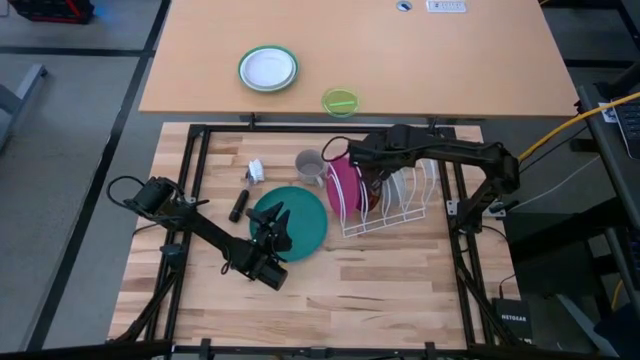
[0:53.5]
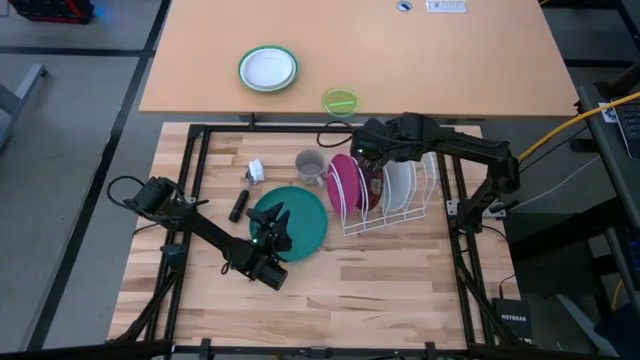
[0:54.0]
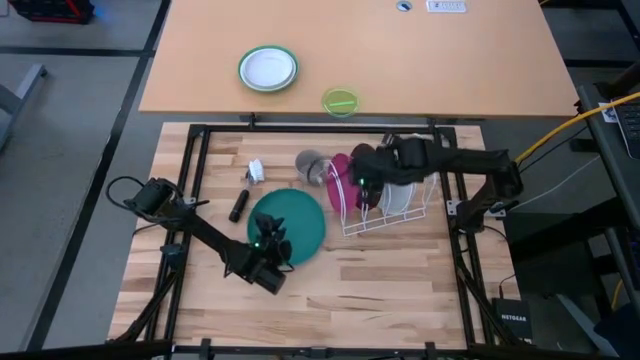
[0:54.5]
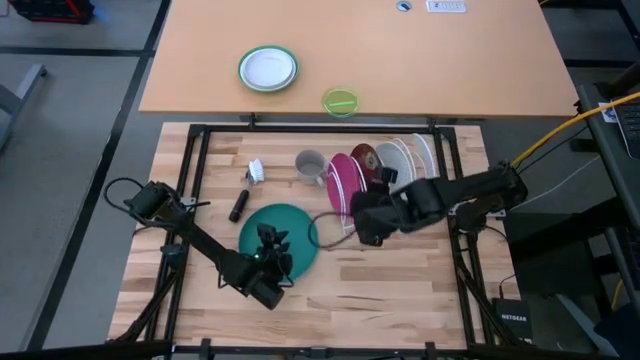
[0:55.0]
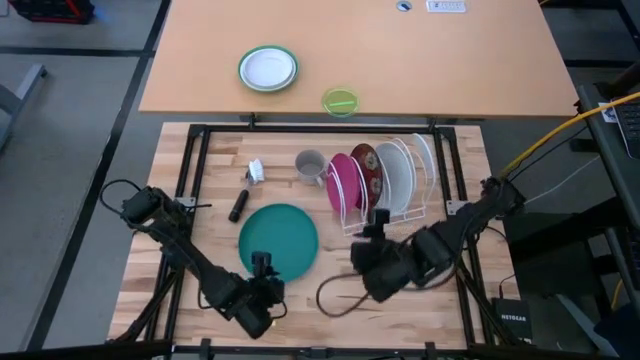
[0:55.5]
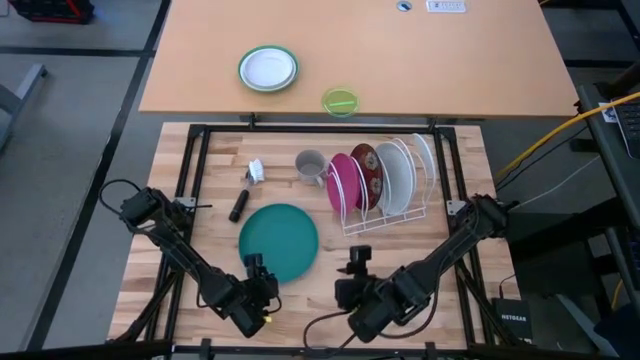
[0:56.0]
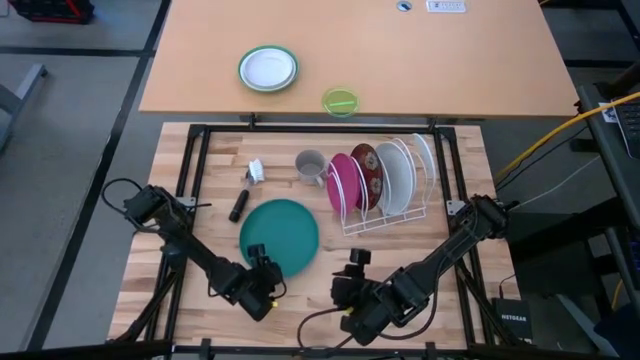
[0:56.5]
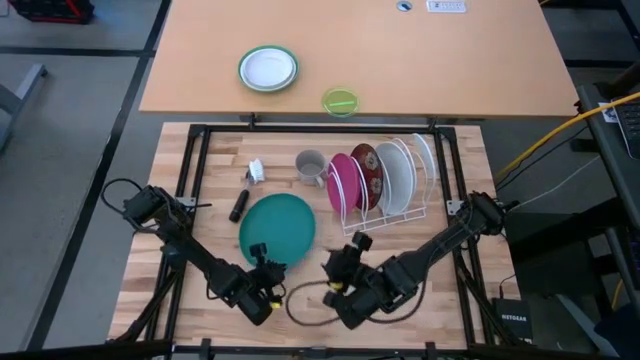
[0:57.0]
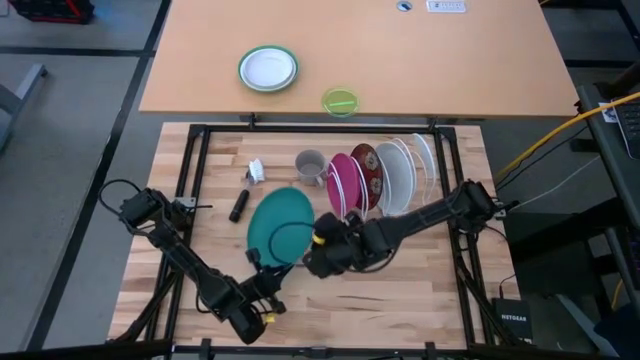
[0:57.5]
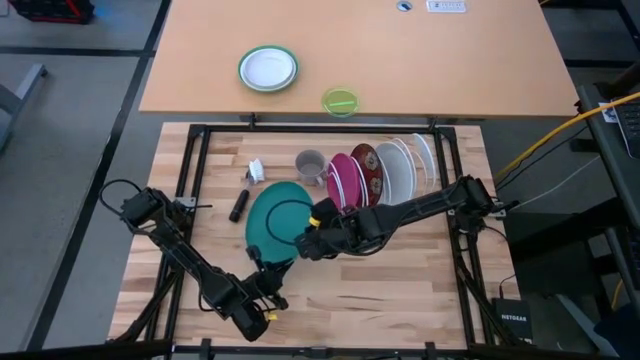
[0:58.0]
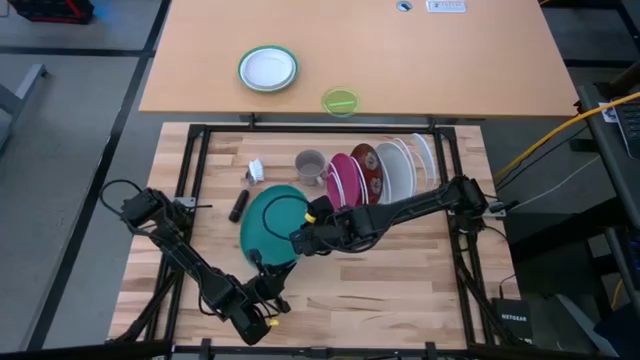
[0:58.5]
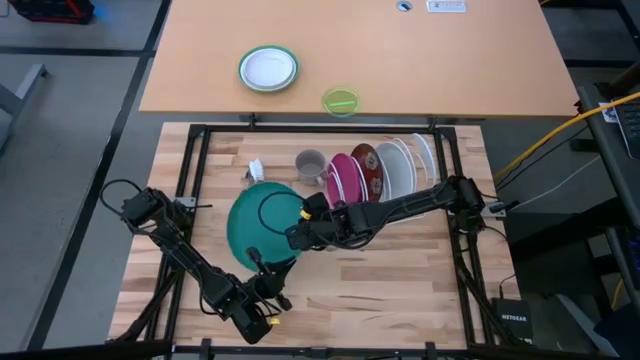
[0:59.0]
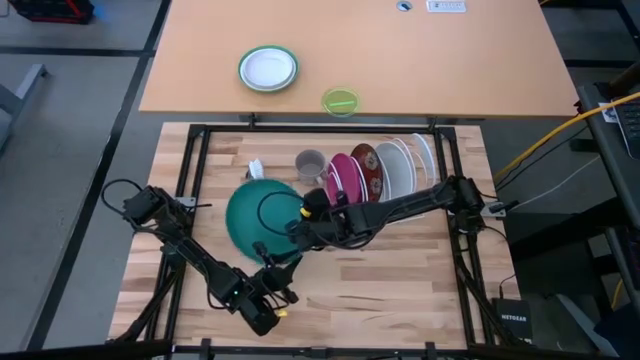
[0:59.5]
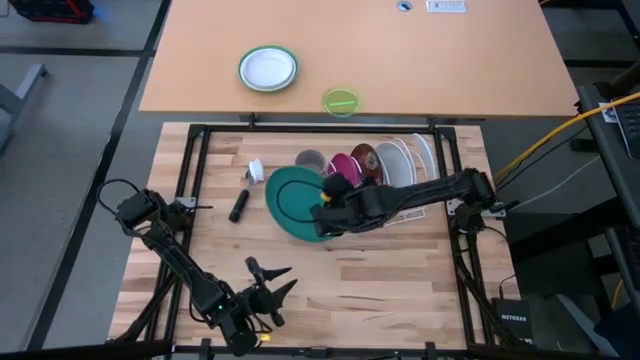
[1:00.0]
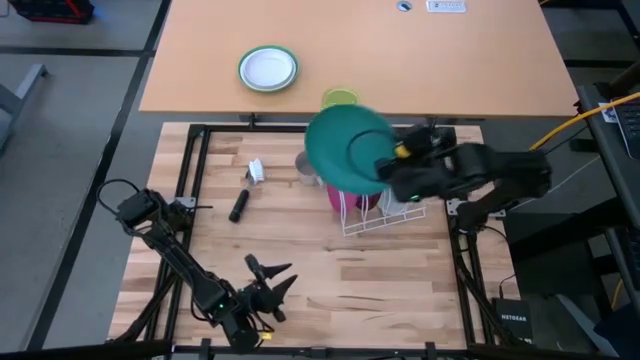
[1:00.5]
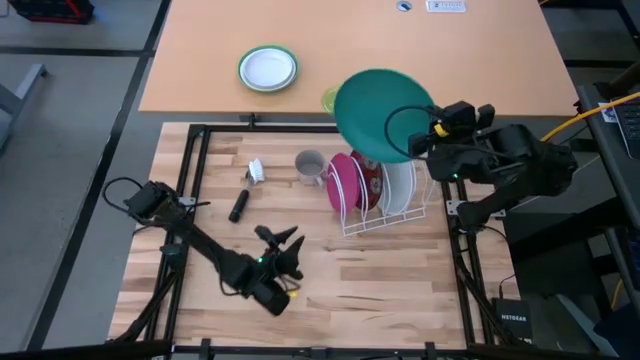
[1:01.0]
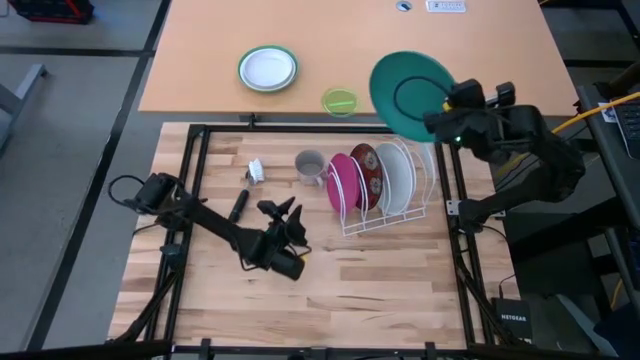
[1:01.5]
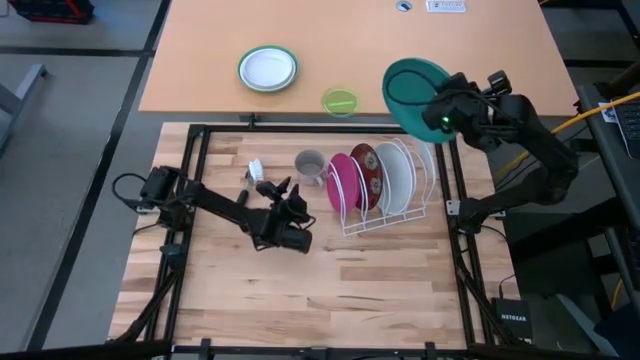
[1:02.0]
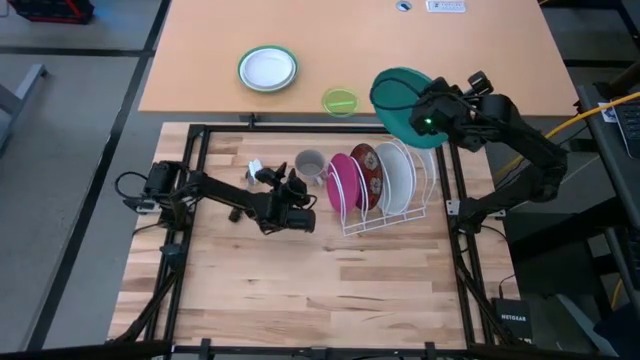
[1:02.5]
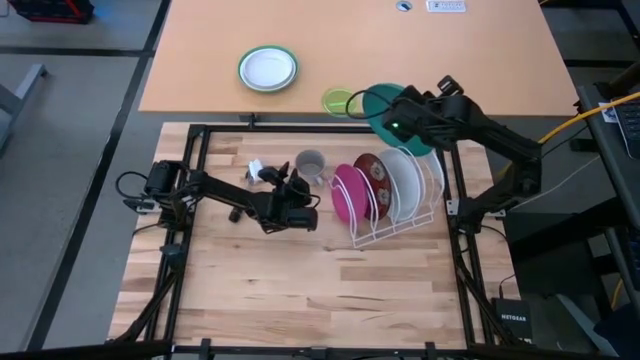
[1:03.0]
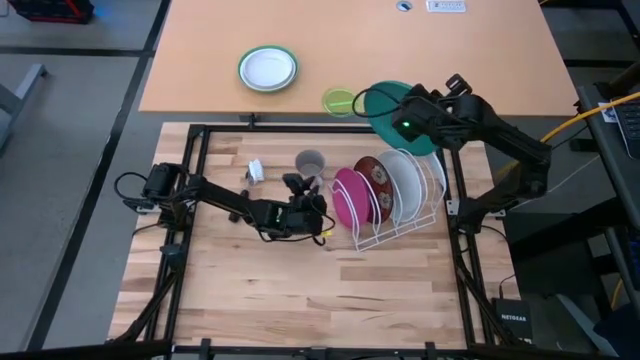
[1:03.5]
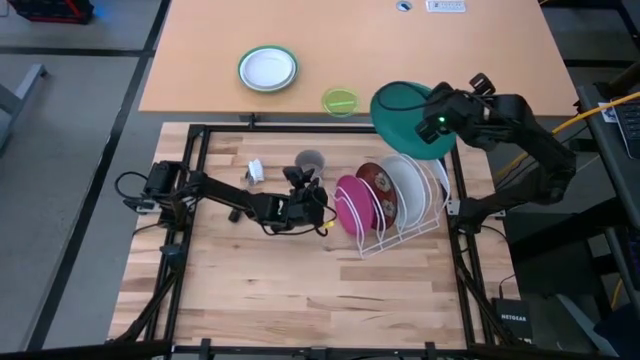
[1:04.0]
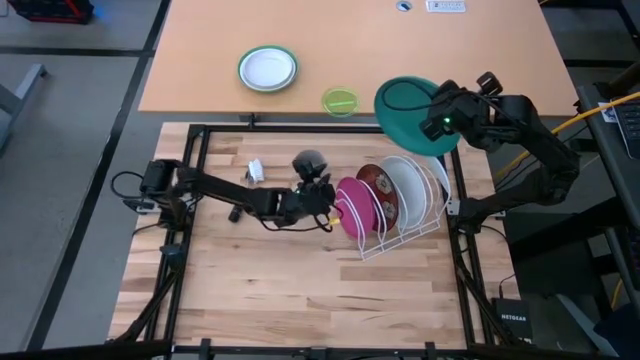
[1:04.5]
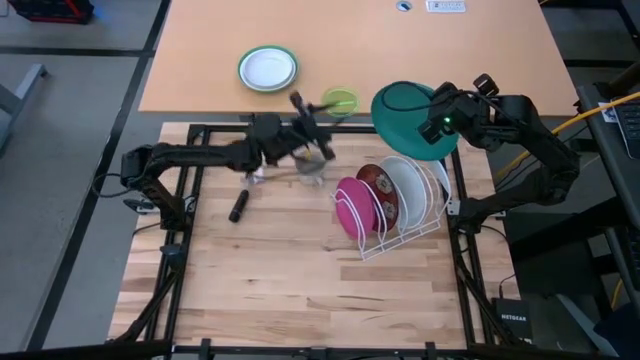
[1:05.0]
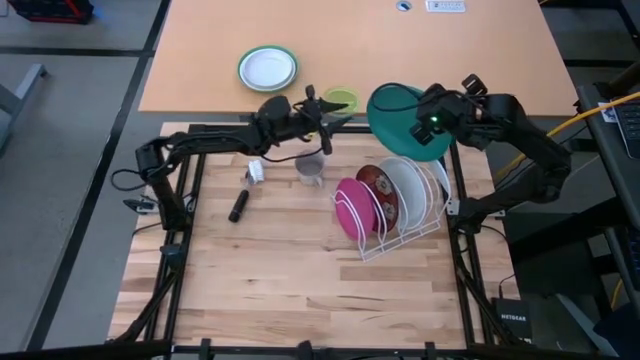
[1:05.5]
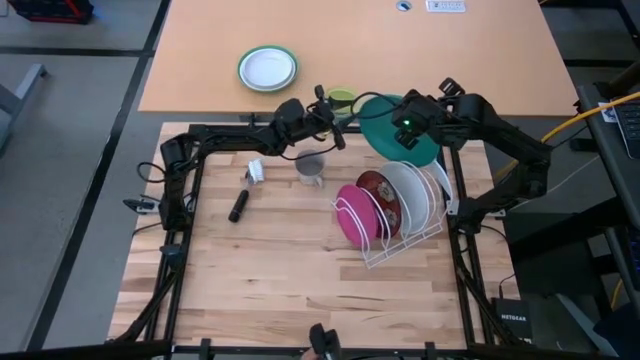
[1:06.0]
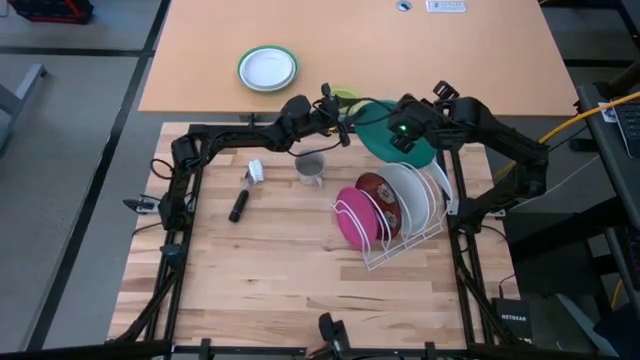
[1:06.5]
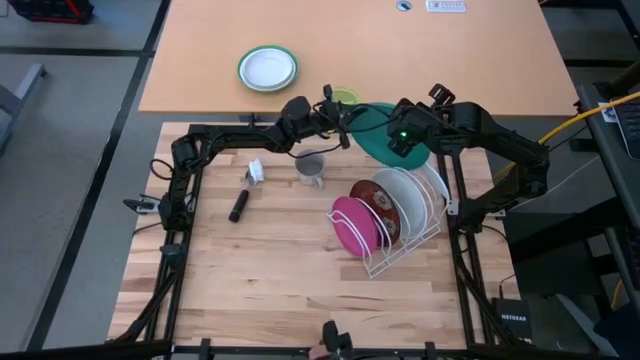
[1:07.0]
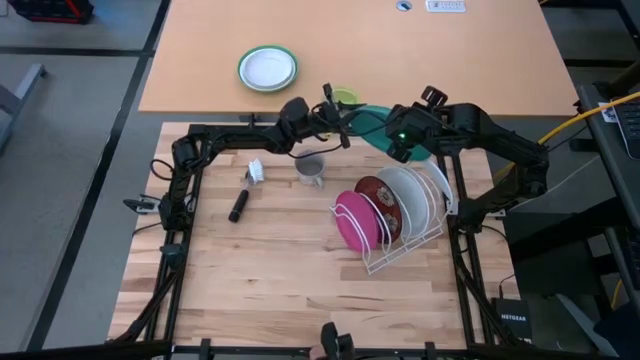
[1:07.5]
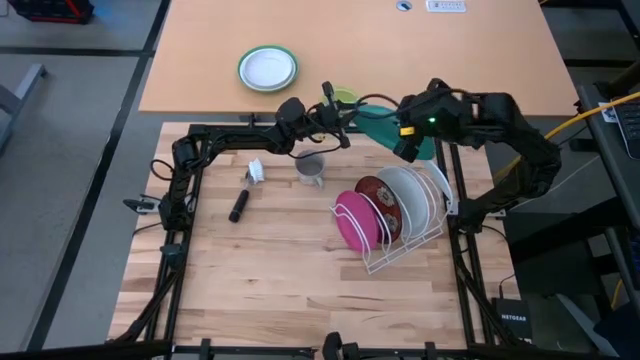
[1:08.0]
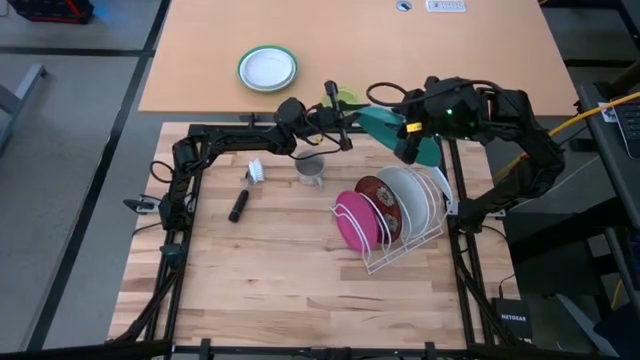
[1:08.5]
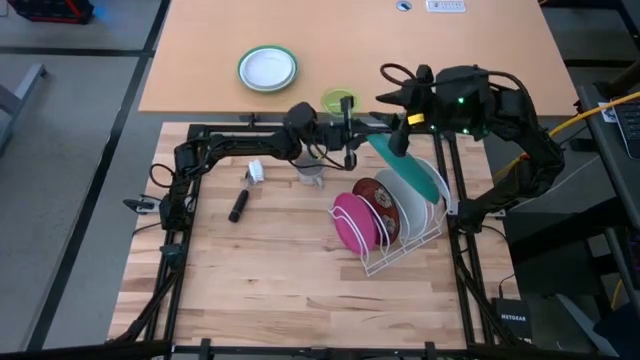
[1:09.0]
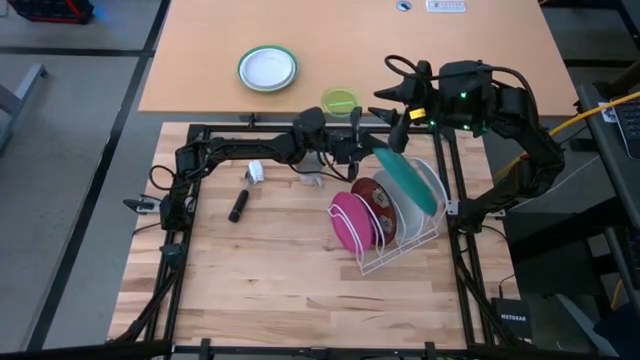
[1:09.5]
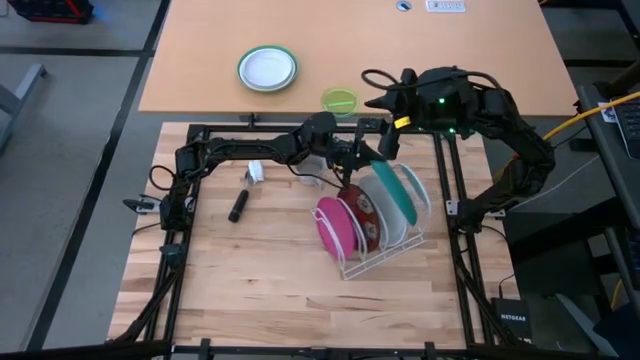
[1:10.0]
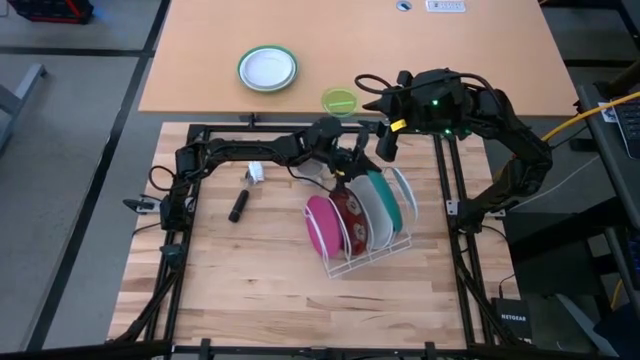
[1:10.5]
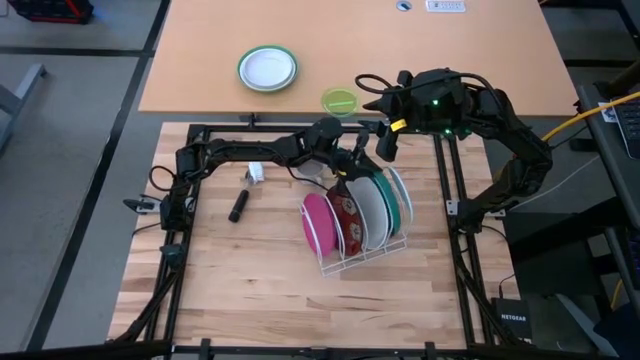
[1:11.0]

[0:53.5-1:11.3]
Task: Sort dishes
Put the green plate in the white dish rack

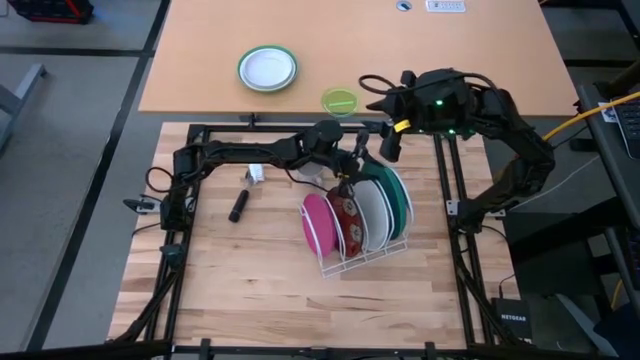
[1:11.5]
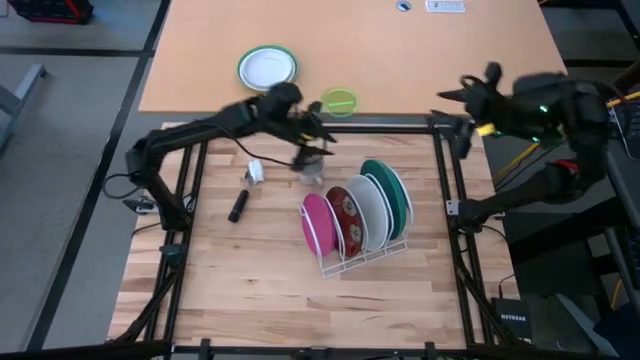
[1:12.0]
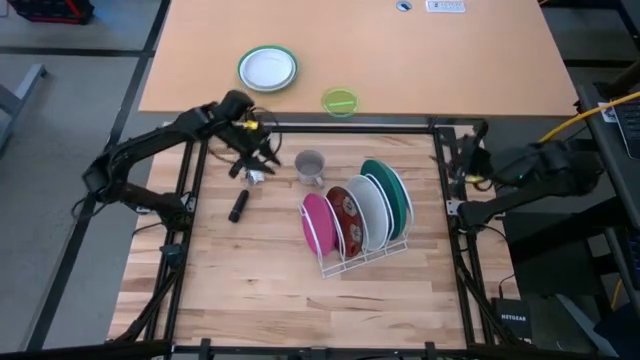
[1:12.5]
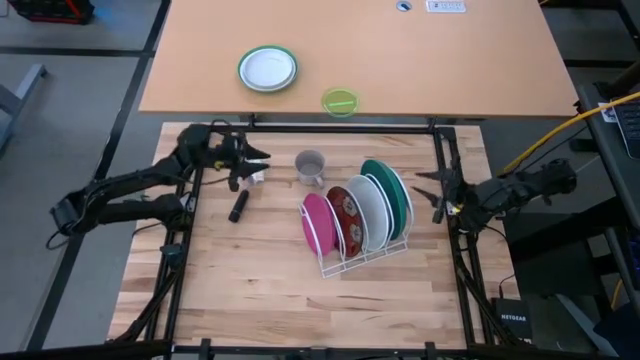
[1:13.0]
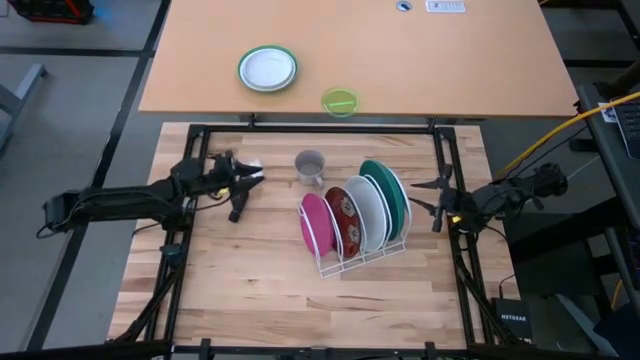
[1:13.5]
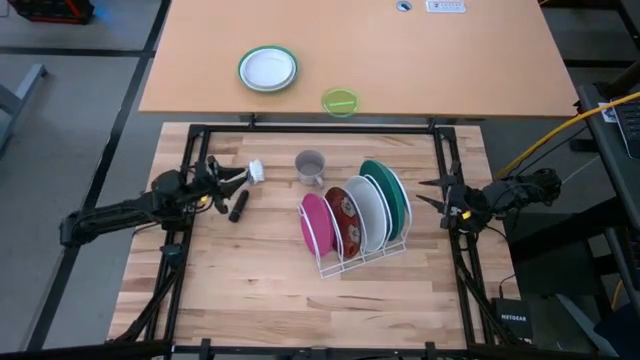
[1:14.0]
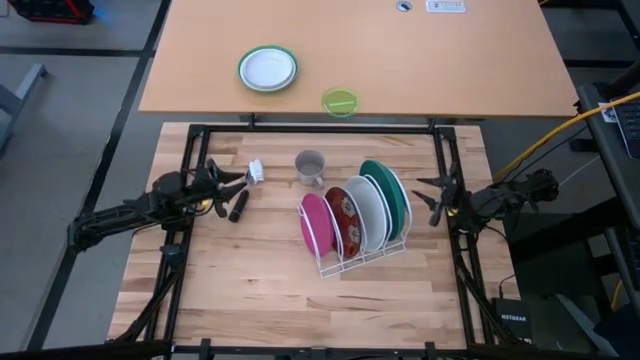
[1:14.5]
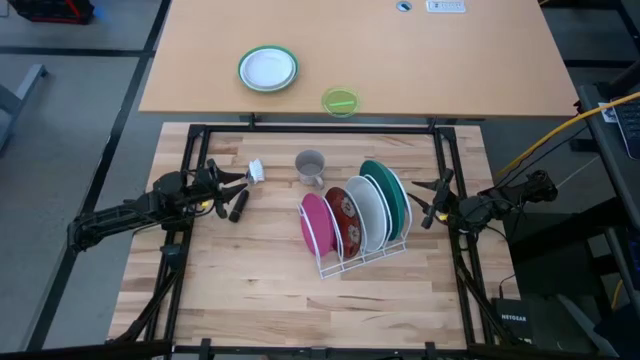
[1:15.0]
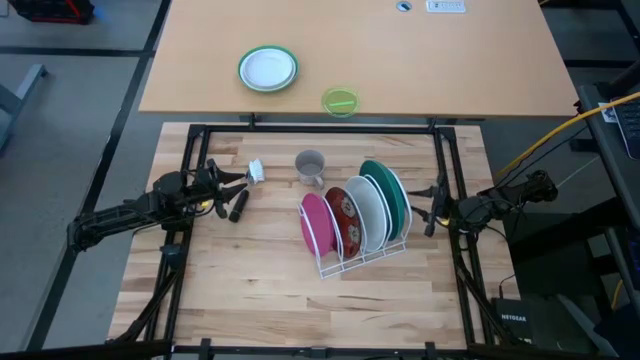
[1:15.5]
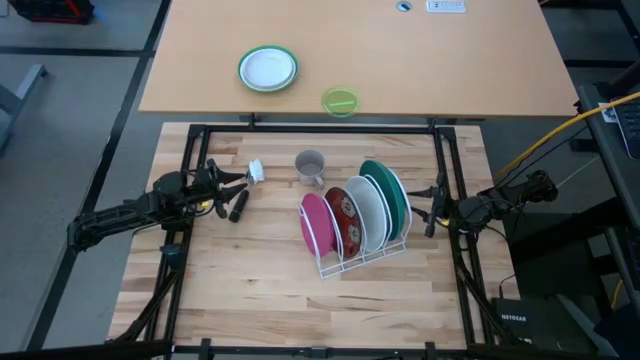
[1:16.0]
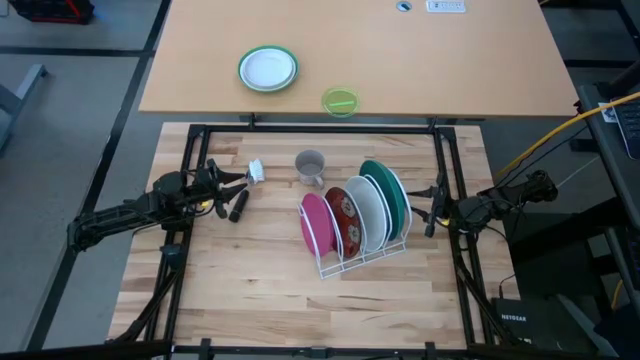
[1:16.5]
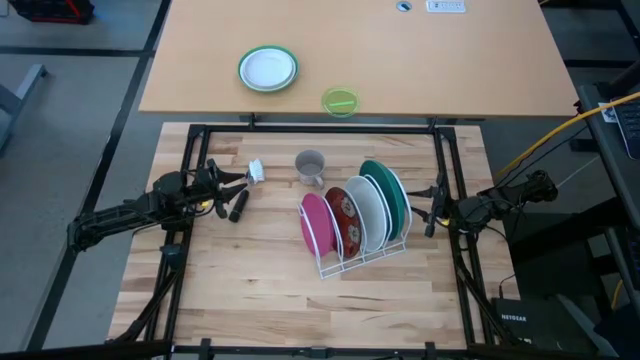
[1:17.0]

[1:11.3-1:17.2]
Return to Home Position
